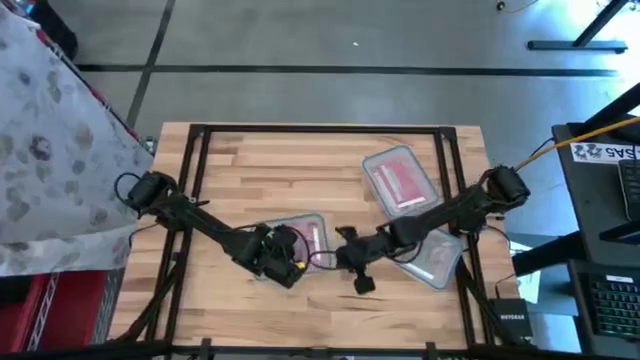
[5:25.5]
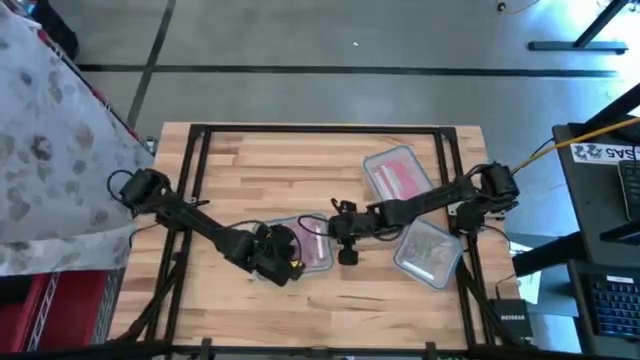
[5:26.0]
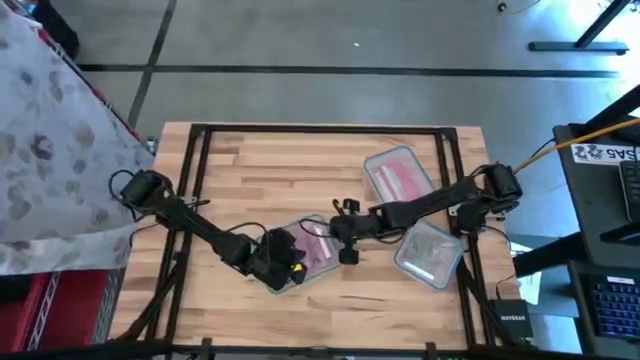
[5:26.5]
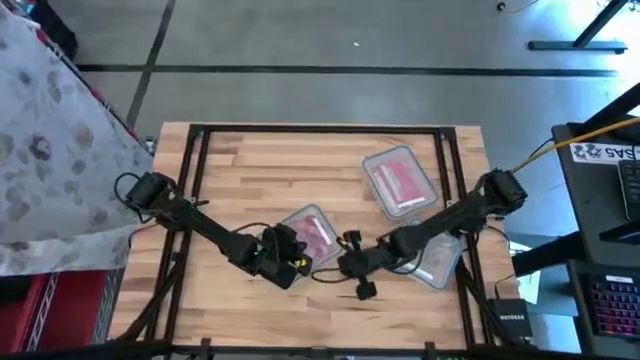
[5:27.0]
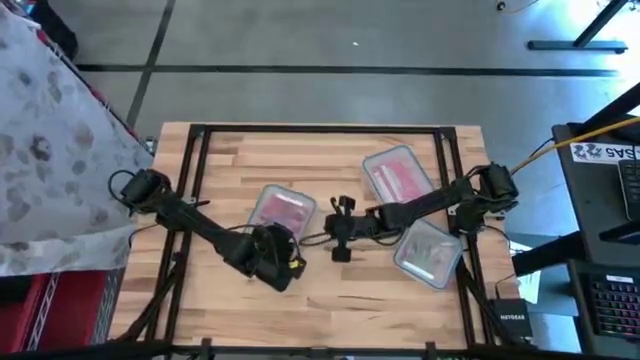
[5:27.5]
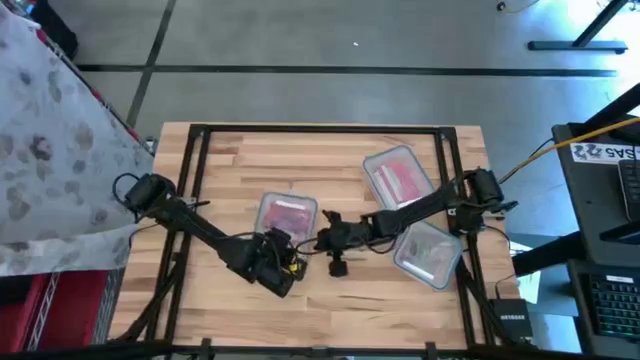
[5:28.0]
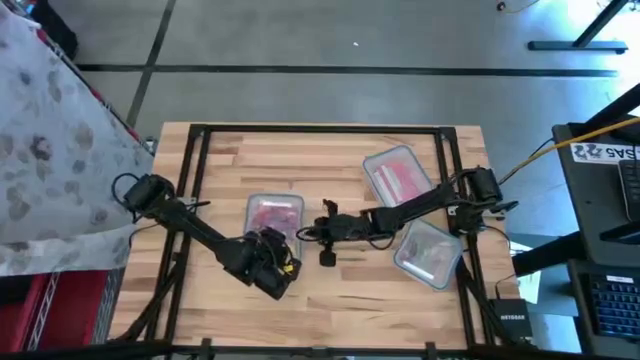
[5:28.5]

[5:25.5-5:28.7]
Task: Sort candy
Close the rectangular transparent food container

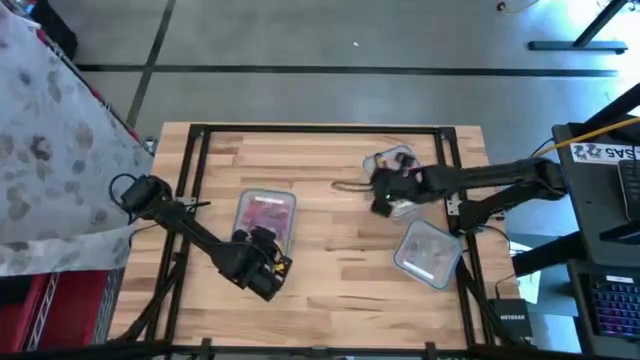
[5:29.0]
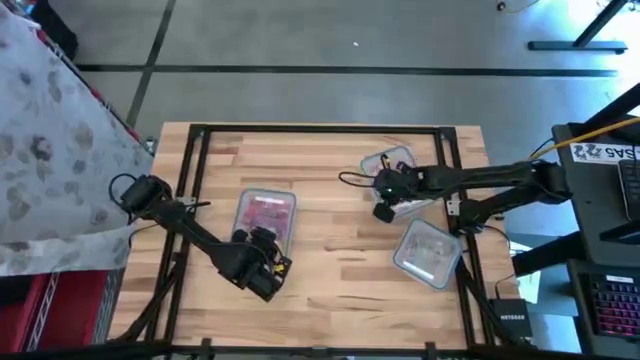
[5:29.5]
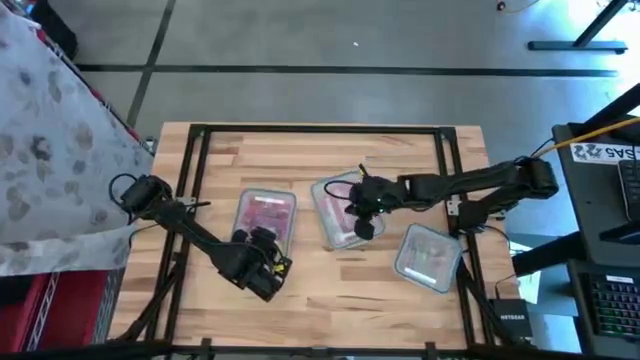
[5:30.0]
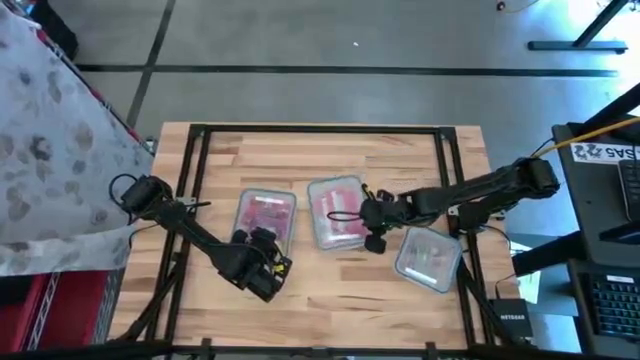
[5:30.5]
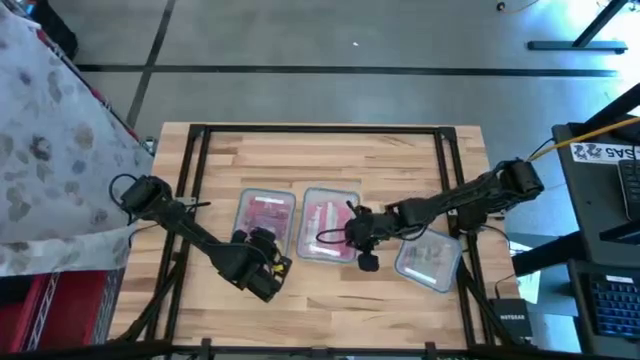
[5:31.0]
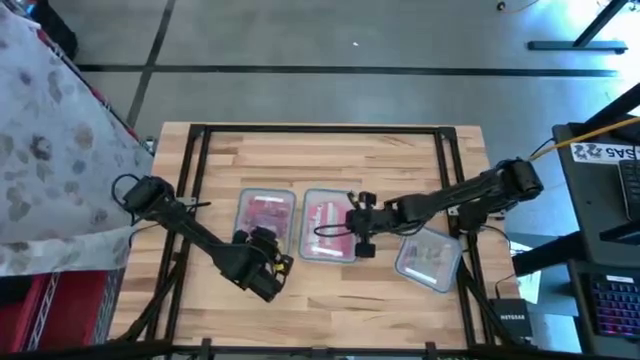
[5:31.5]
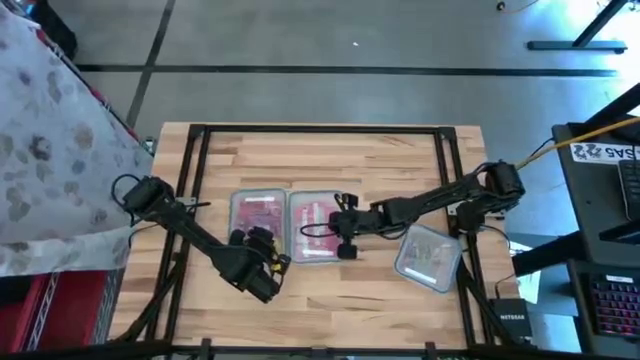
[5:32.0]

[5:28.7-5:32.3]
Move the right rectangular transparent food container to the center of the table

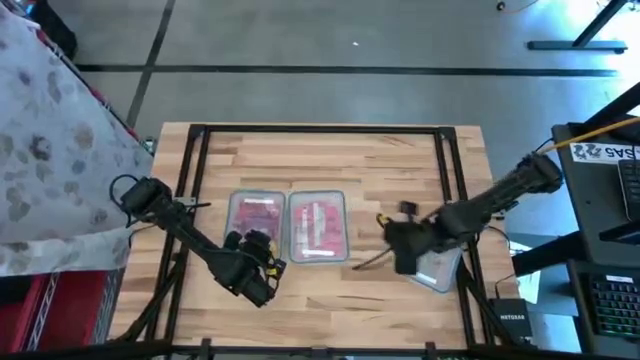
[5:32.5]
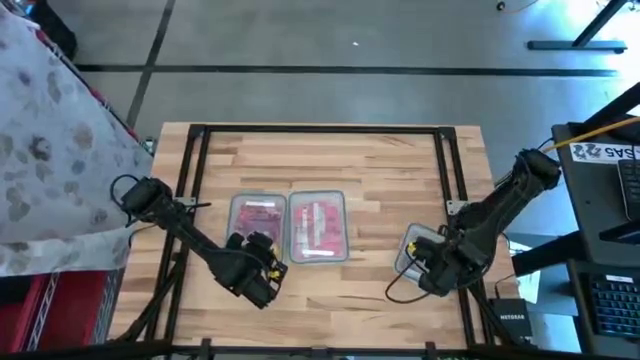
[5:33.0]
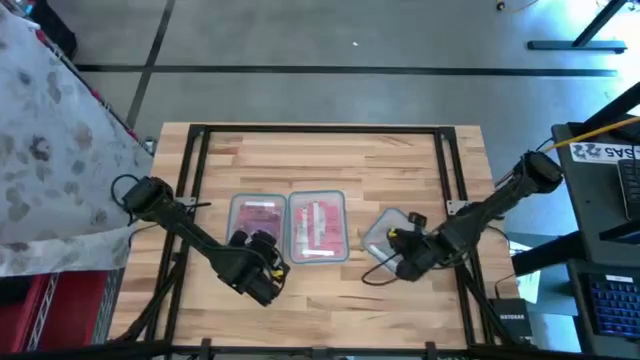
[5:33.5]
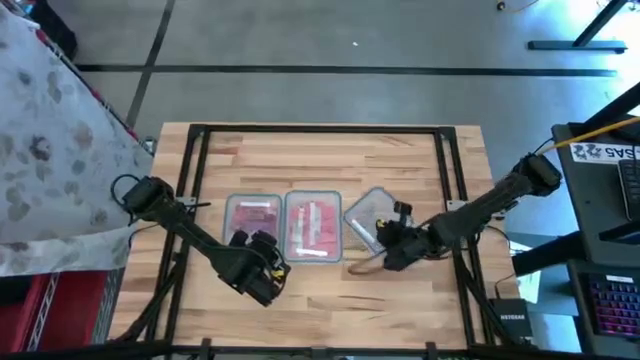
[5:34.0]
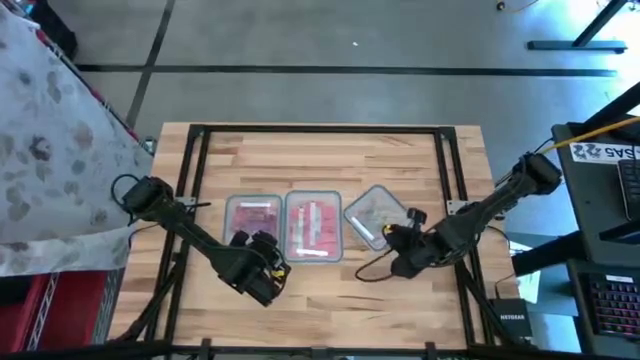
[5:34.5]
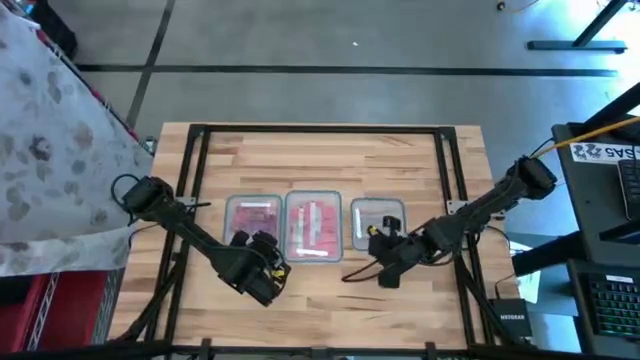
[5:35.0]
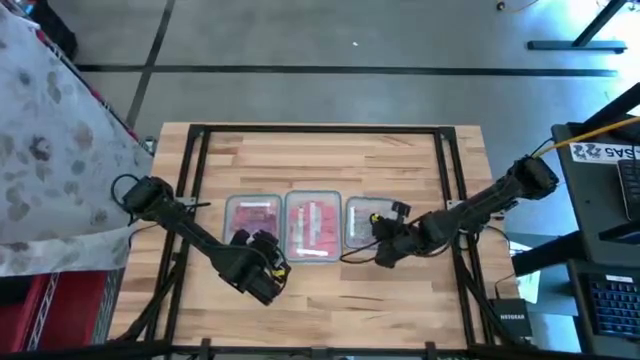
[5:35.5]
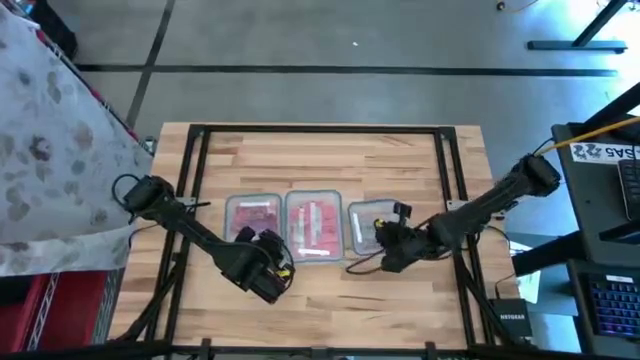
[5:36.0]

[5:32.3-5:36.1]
Move the square transparent food container to the center of the table

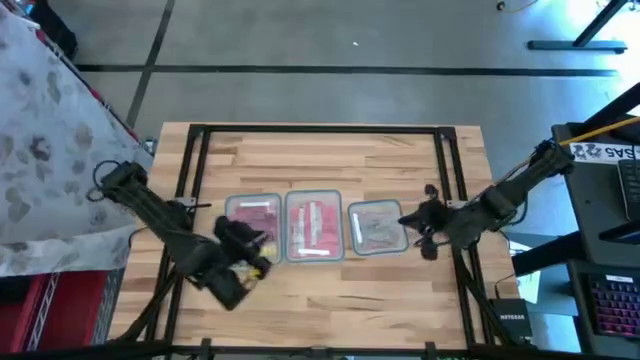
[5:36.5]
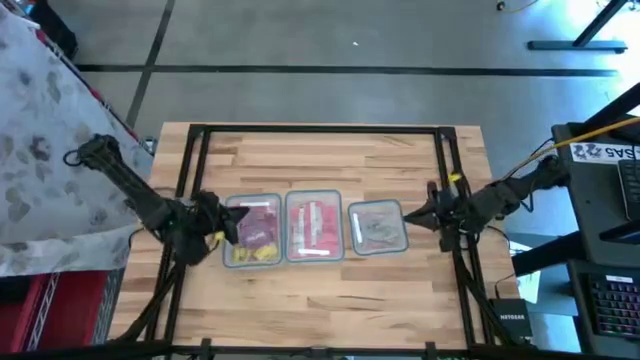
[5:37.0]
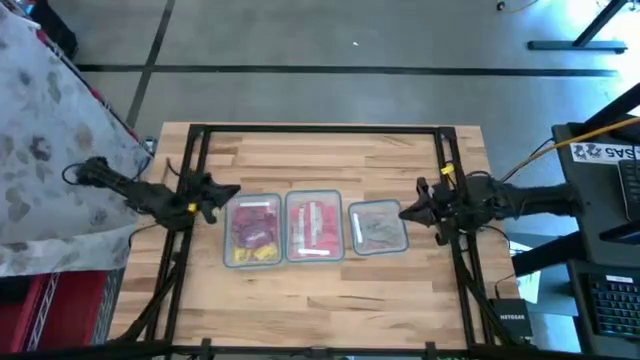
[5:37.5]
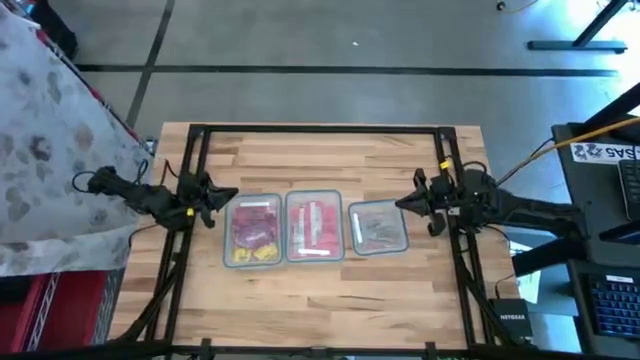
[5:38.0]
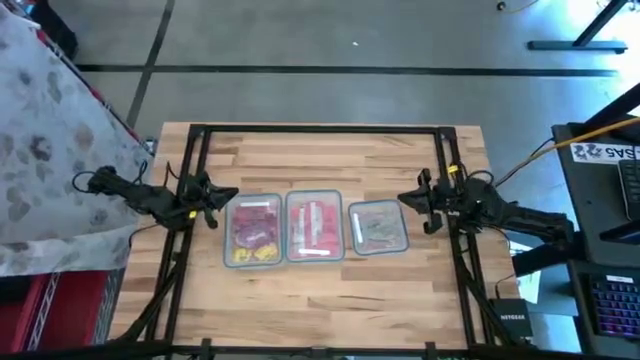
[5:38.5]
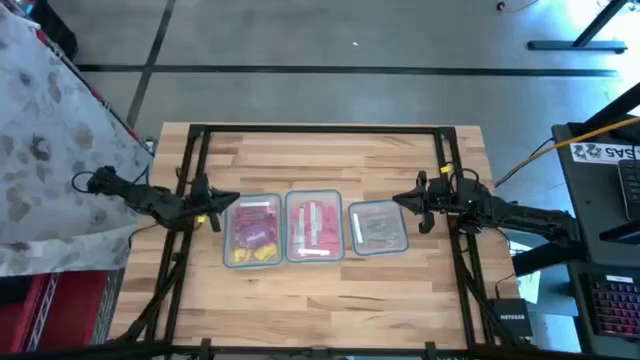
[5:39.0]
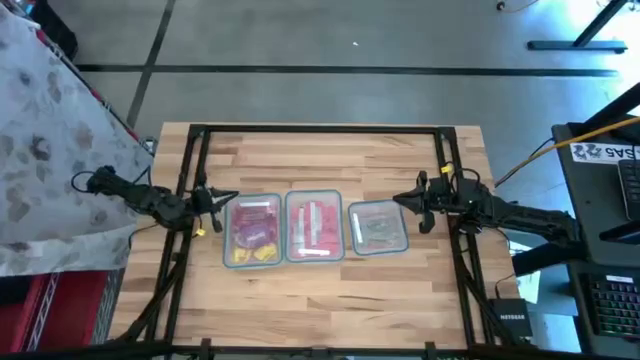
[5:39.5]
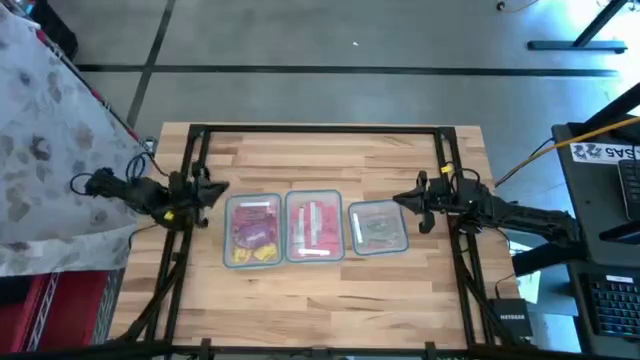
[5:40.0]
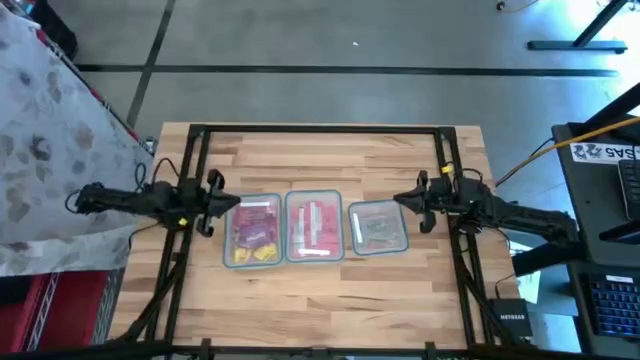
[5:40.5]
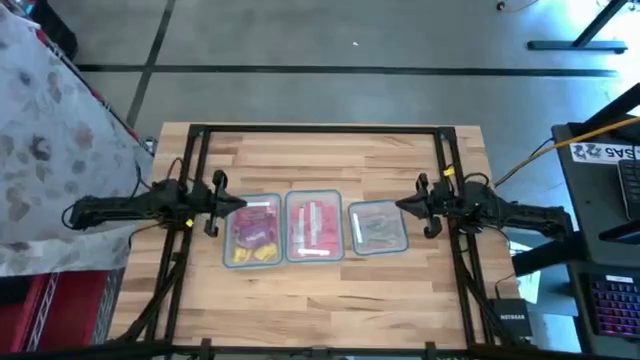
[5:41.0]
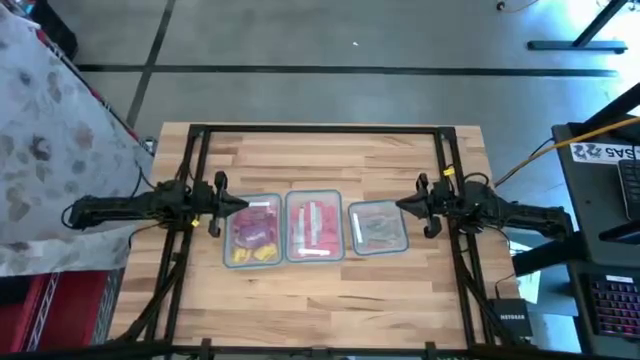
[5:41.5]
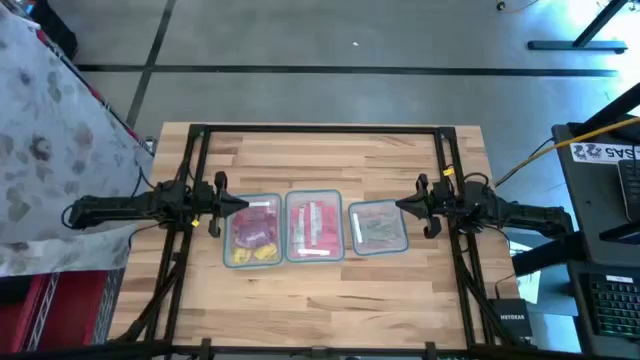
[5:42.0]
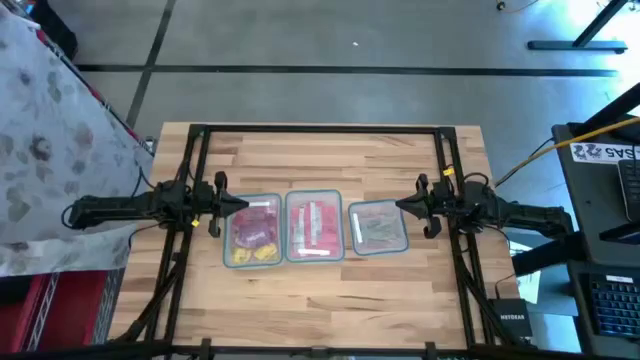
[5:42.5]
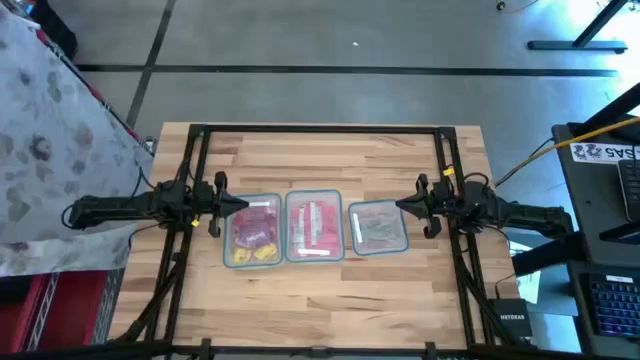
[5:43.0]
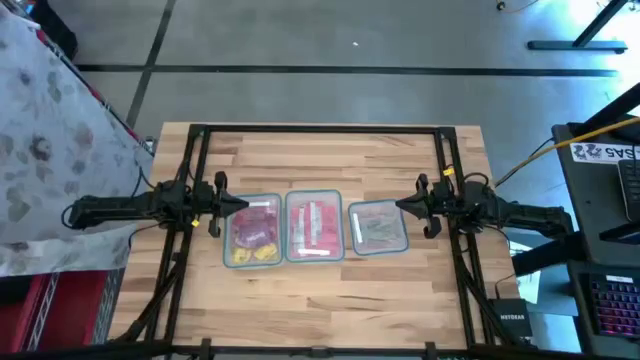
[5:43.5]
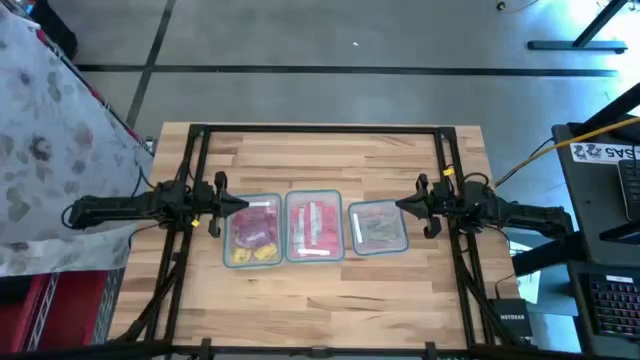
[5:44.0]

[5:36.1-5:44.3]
Return to Home Position

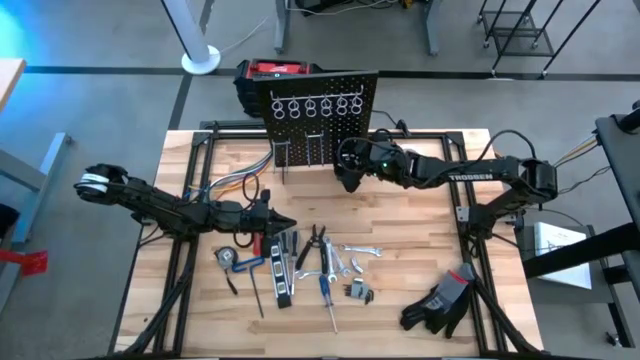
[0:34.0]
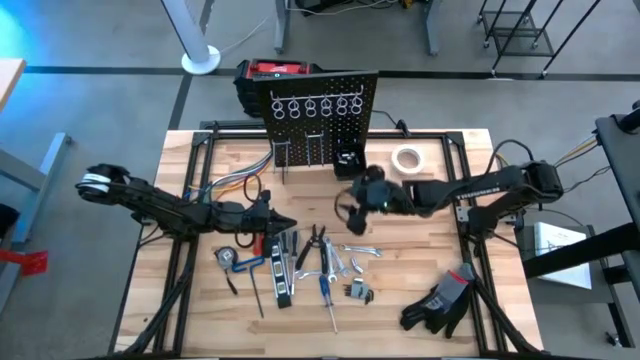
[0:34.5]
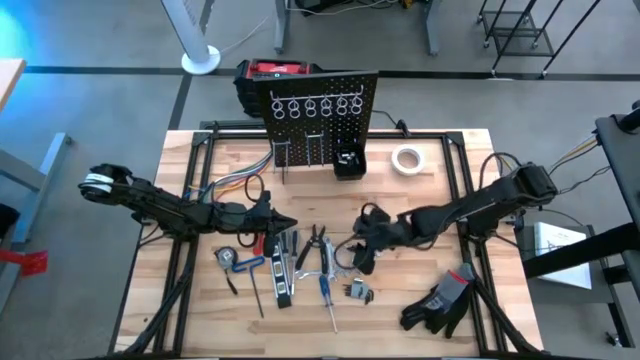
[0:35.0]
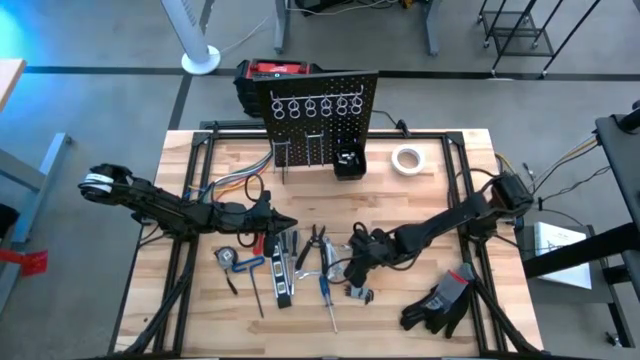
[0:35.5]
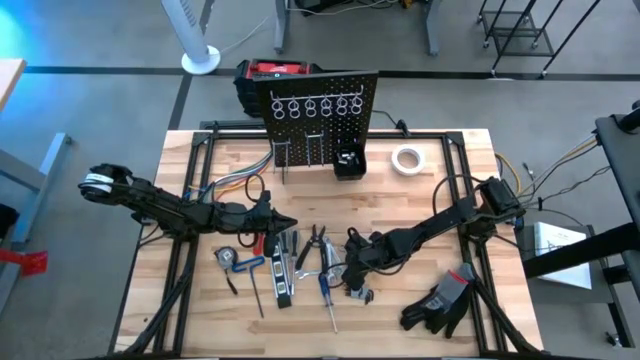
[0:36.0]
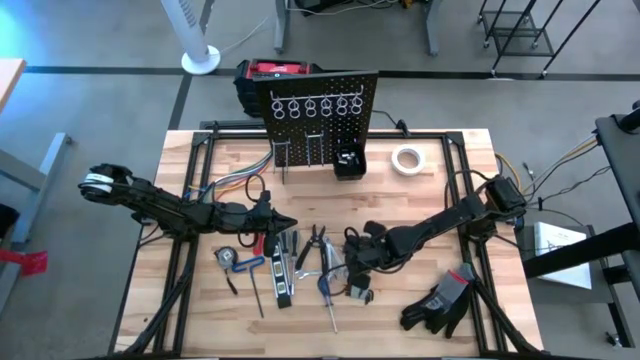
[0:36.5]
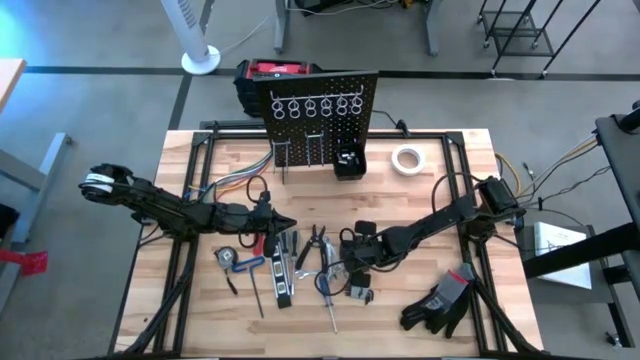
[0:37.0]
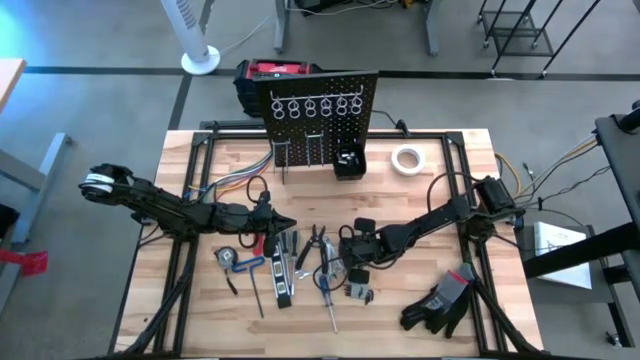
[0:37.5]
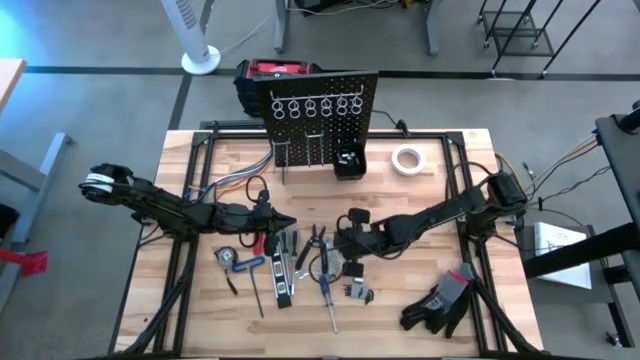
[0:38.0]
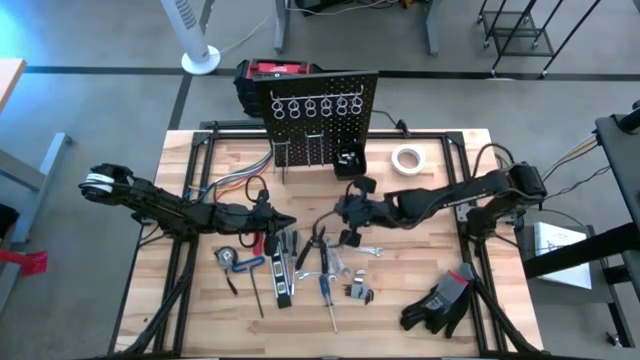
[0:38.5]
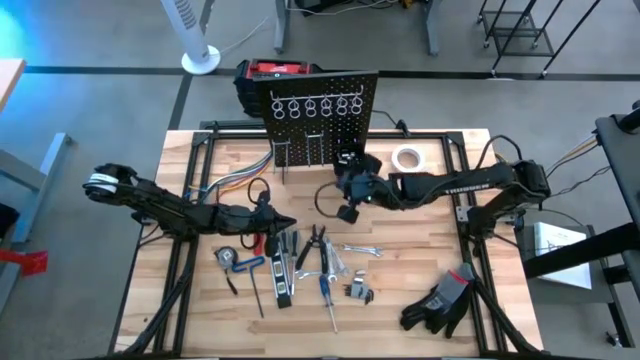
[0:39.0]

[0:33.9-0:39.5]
Task: Hang tools onto peg board
Put the socket into the black tool bin on the peg board
